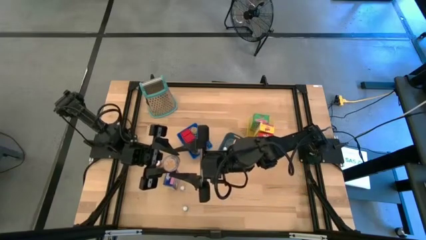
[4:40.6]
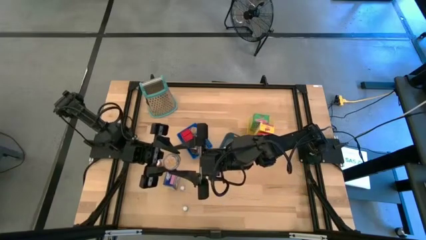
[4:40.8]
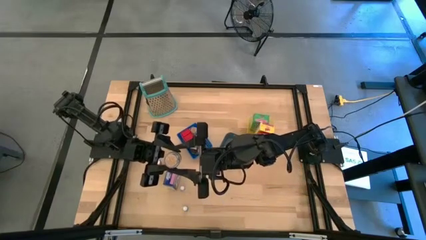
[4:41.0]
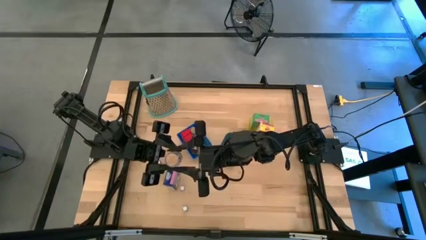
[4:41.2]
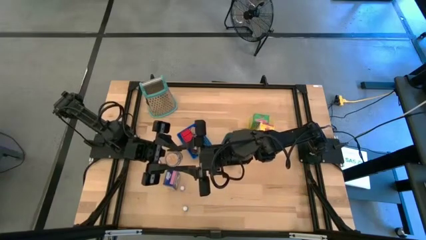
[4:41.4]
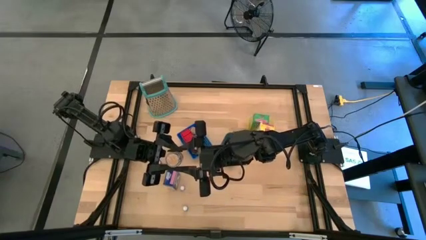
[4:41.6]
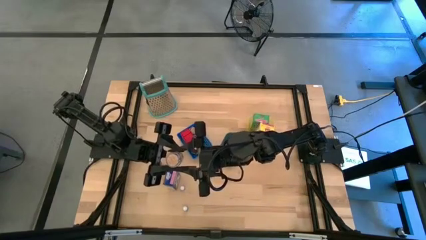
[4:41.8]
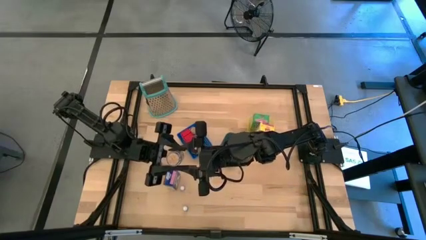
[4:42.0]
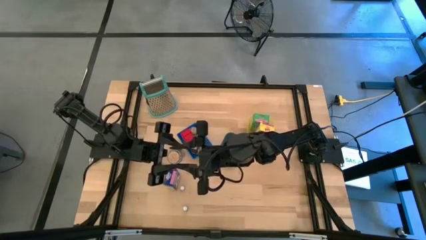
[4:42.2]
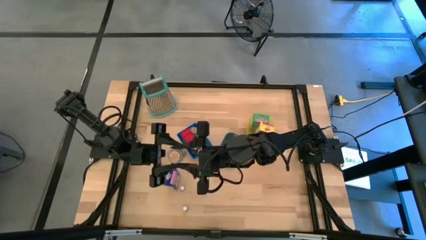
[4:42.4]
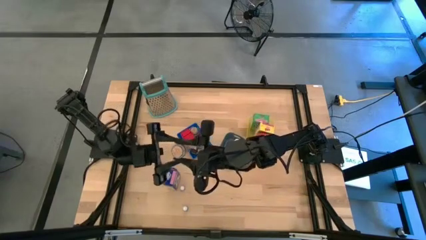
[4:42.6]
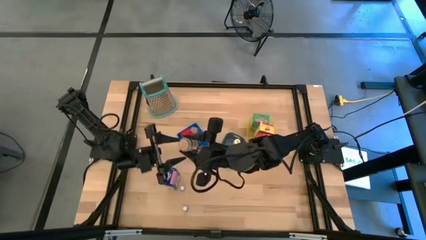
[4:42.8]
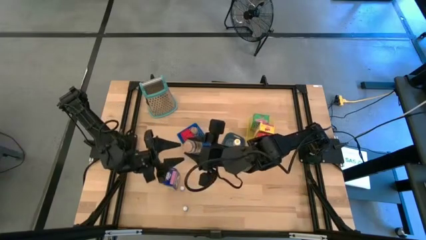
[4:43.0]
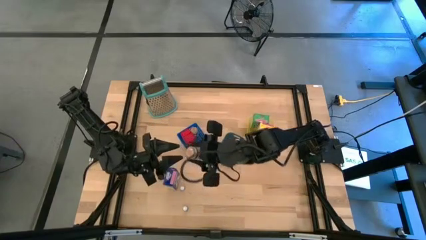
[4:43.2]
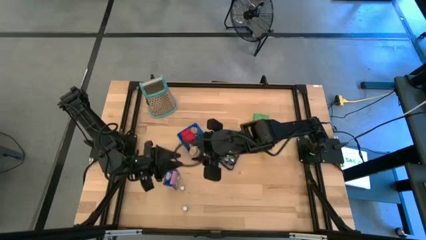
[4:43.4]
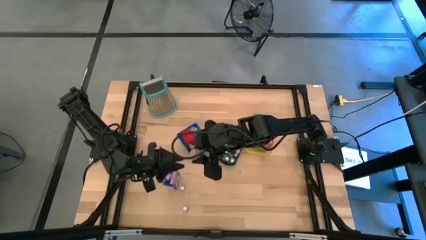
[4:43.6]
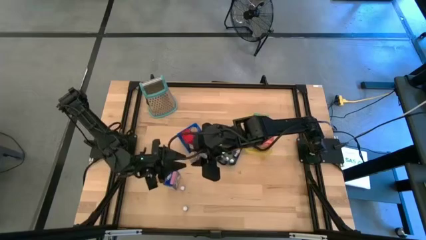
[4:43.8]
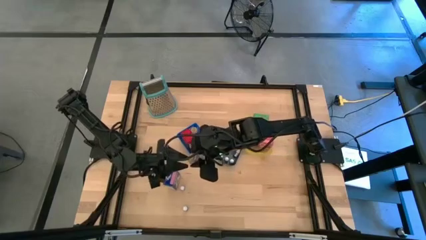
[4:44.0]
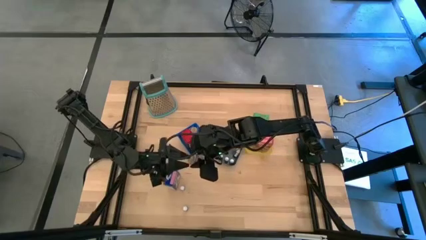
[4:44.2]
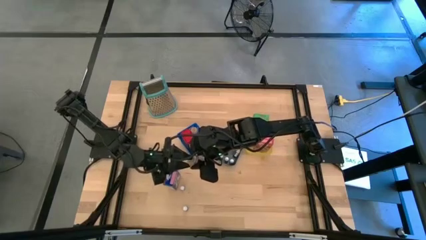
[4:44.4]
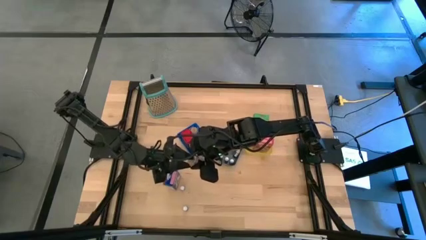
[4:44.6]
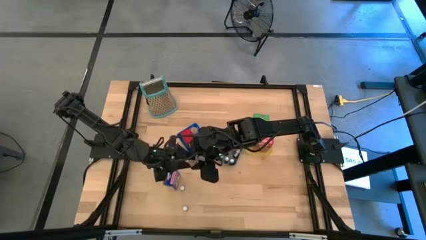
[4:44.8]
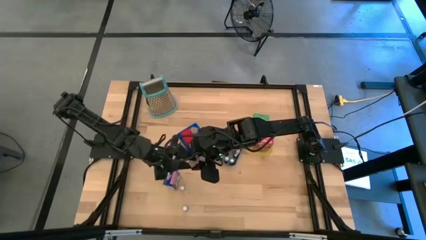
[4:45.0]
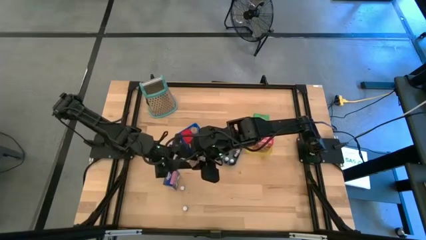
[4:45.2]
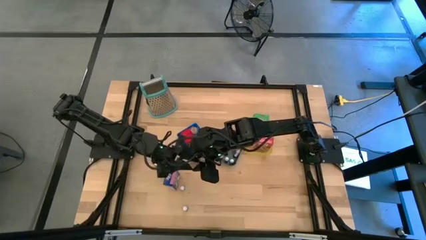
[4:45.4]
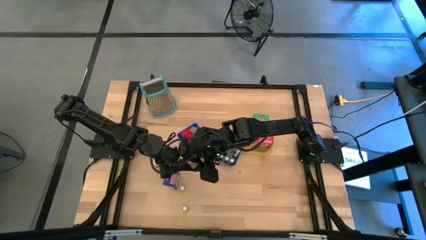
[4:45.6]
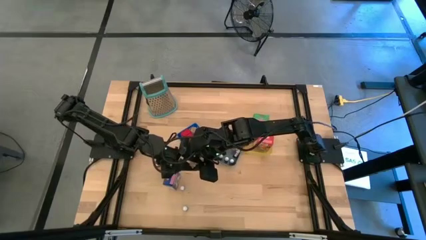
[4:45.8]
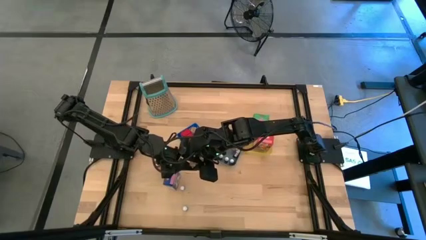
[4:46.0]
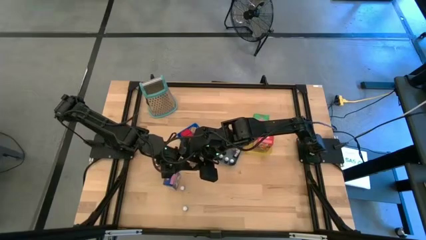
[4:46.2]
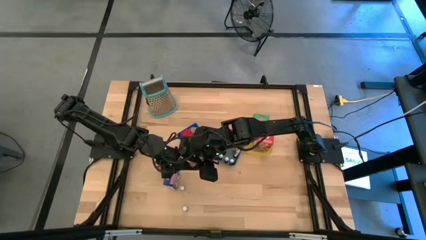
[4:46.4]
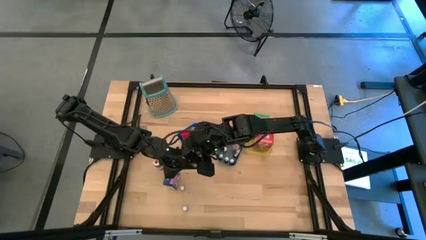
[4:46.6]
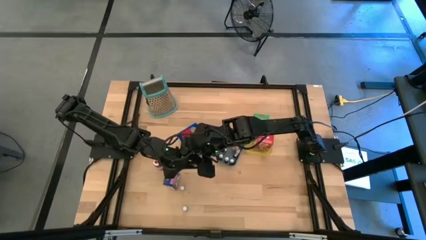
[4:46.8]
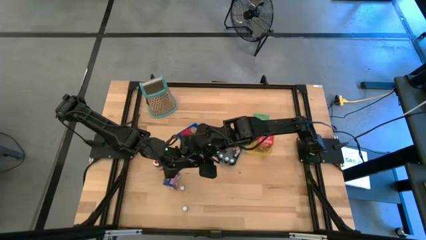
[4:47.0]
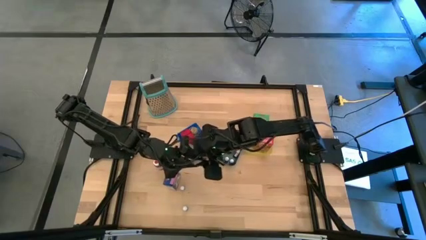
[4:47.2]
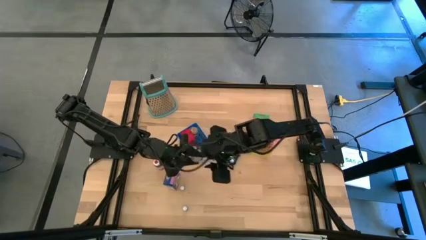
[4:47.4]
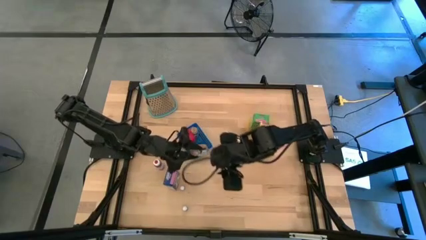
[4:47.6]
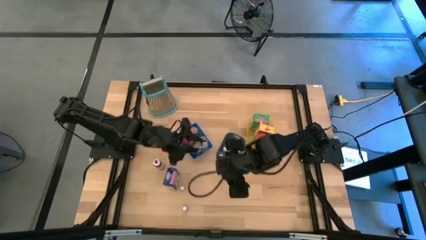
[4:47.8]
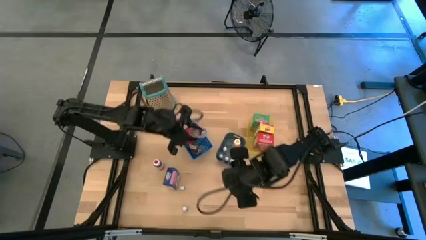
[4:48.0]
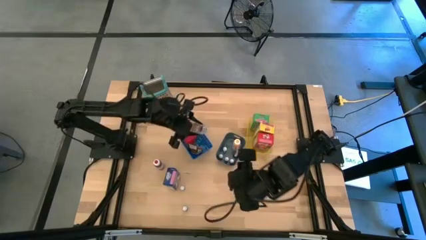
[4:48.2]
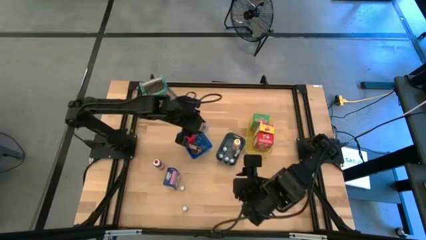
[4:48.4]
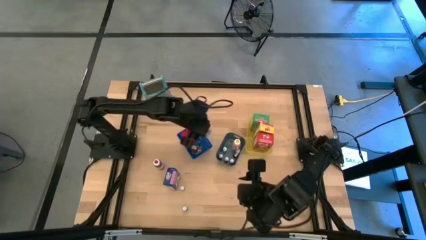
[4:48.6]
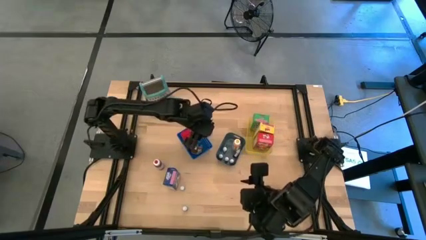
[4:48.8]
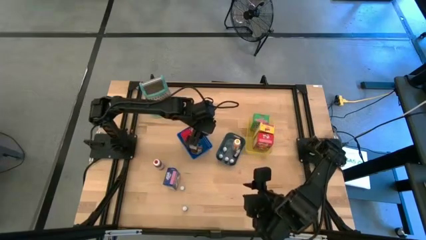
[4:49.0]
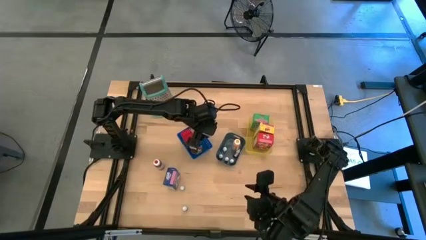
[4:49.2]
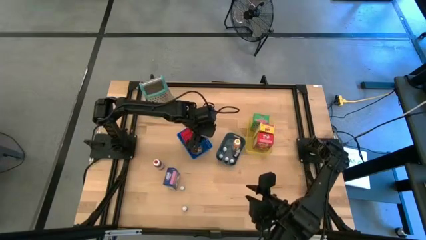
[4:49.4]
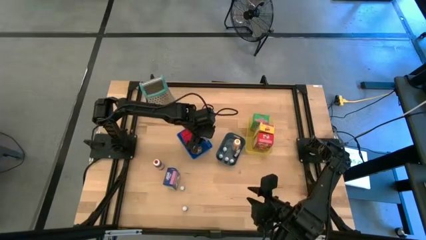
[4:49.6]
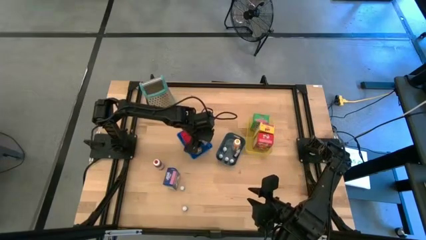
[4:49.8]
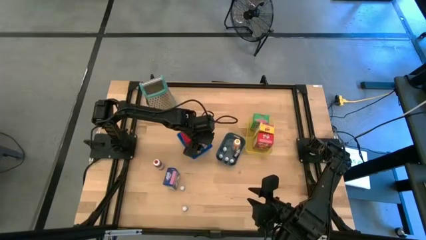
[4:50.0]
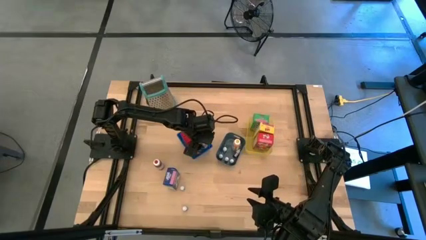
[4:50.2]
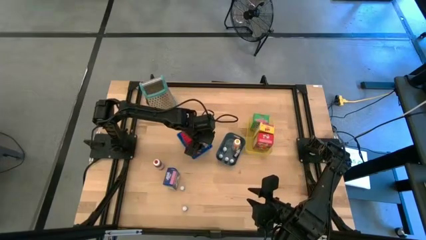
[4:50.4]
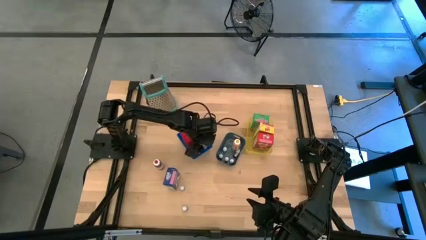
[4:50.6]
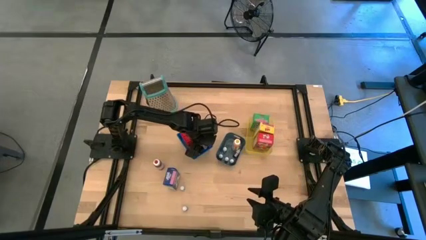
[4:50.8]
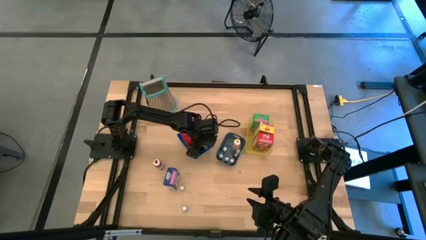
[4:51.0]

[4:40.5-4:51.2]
Task: Pick & Place Kitchen Items
Put the brown seasoning bottle into the blue bin
